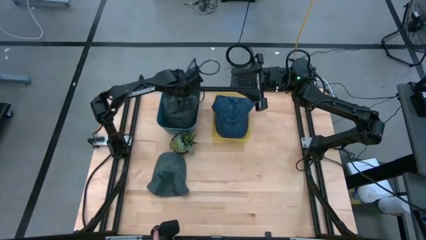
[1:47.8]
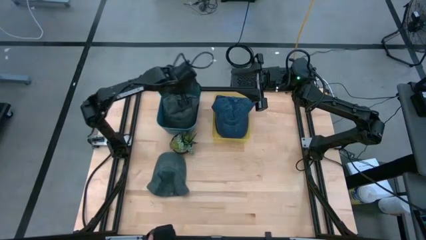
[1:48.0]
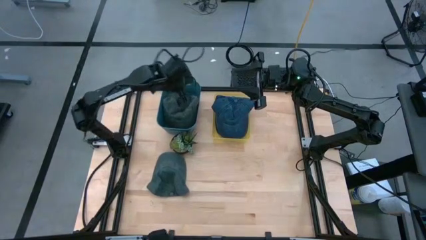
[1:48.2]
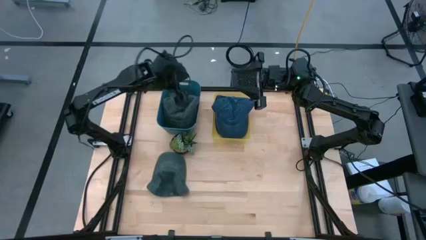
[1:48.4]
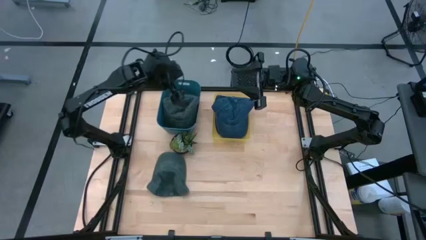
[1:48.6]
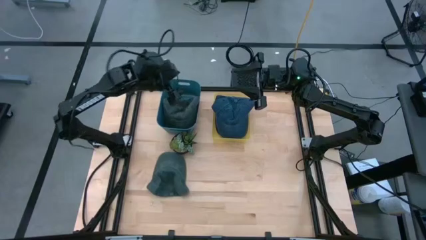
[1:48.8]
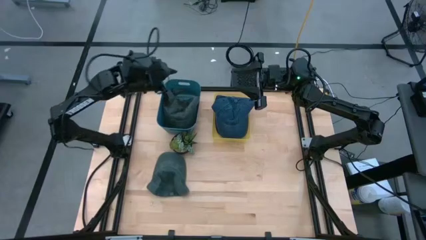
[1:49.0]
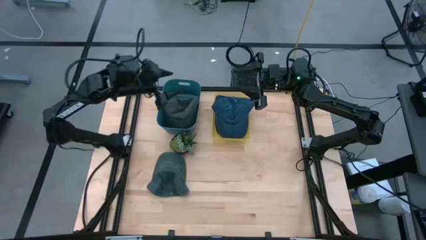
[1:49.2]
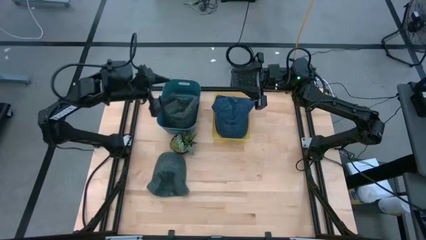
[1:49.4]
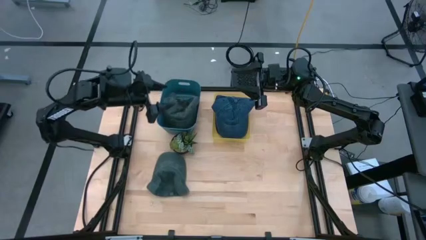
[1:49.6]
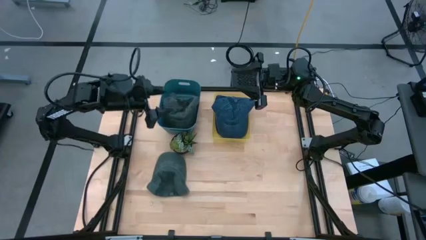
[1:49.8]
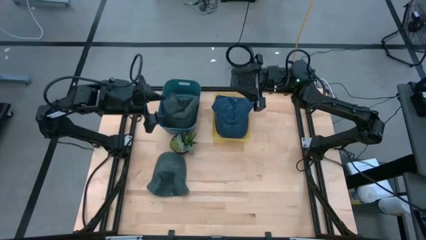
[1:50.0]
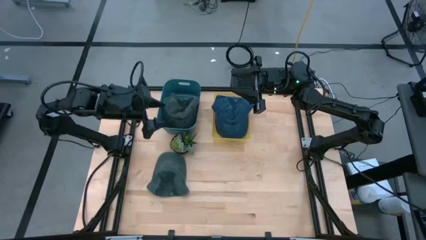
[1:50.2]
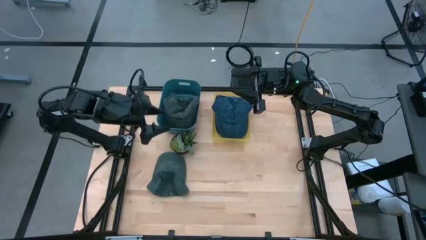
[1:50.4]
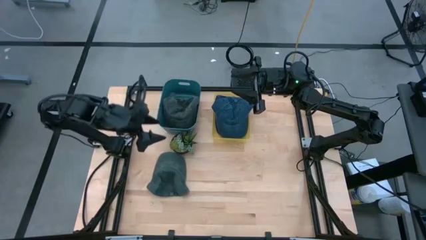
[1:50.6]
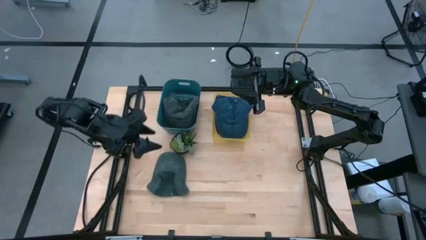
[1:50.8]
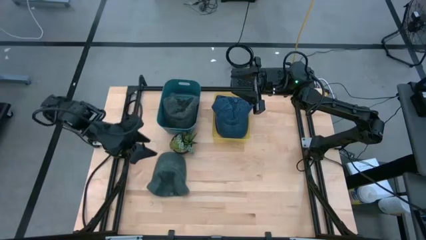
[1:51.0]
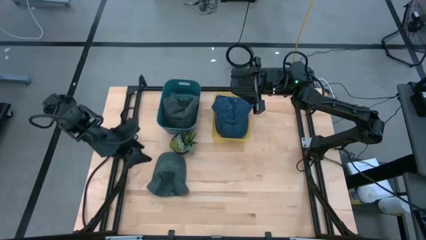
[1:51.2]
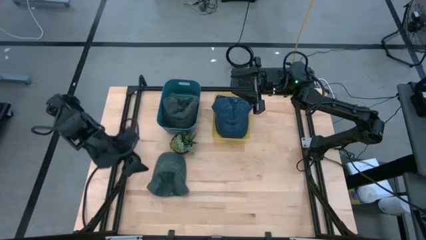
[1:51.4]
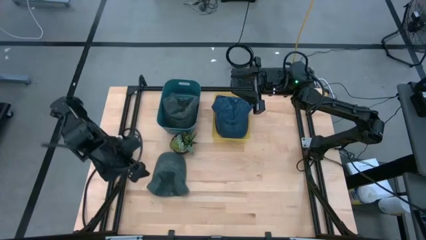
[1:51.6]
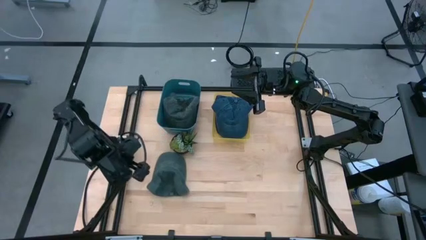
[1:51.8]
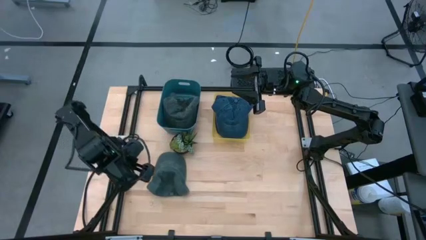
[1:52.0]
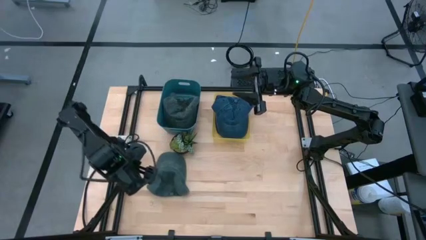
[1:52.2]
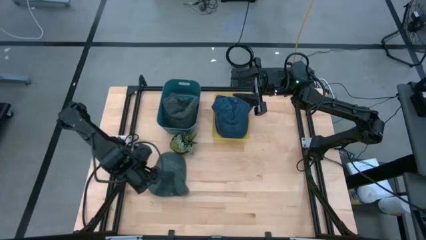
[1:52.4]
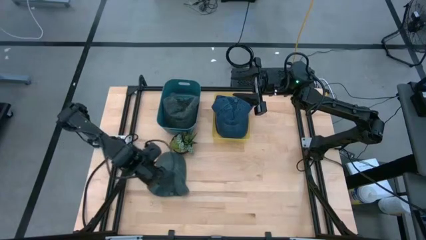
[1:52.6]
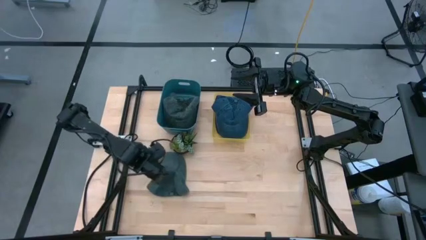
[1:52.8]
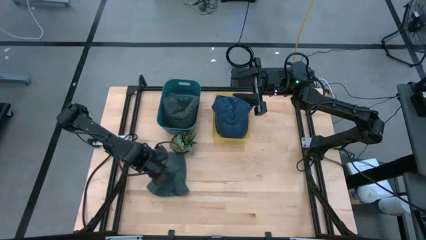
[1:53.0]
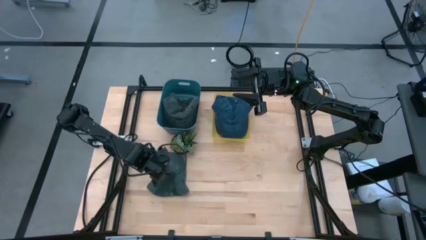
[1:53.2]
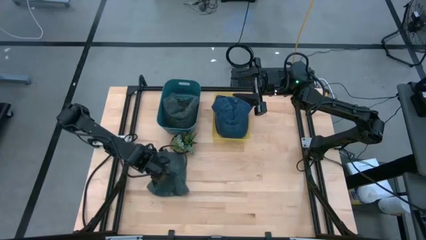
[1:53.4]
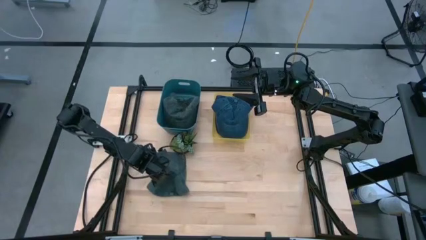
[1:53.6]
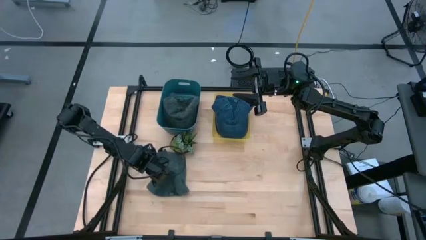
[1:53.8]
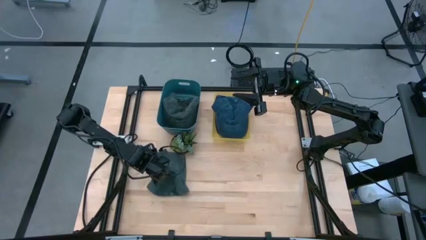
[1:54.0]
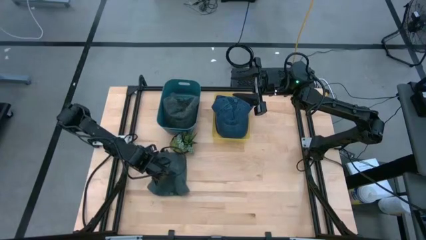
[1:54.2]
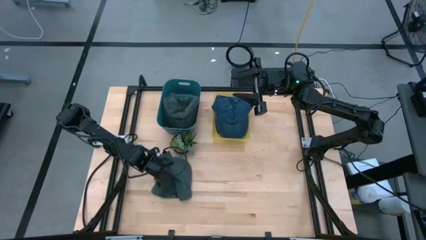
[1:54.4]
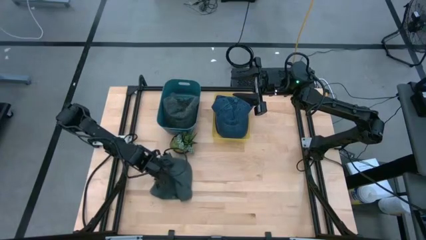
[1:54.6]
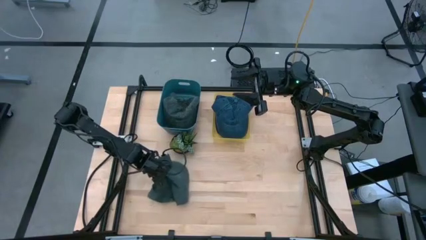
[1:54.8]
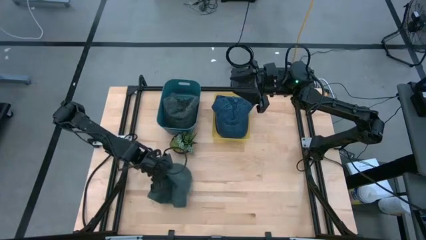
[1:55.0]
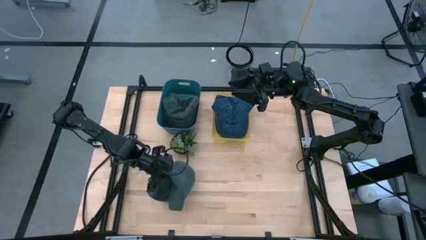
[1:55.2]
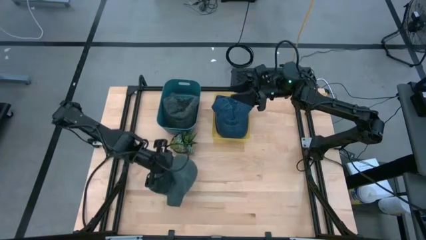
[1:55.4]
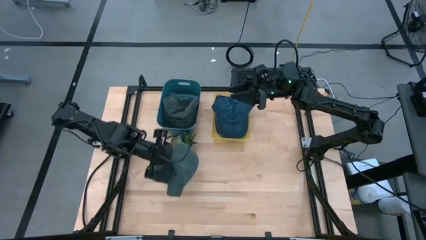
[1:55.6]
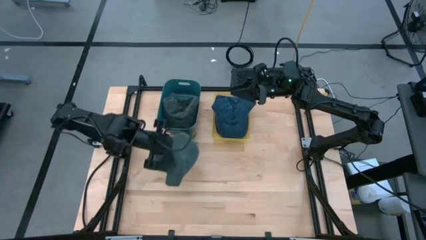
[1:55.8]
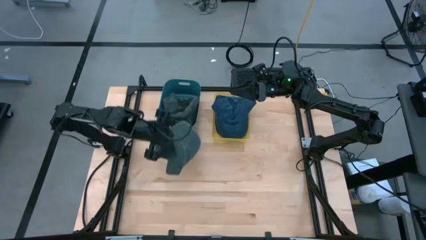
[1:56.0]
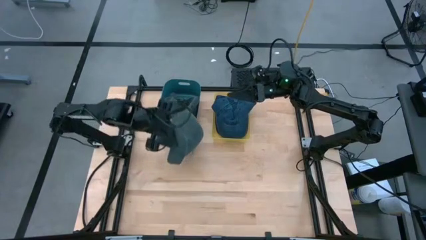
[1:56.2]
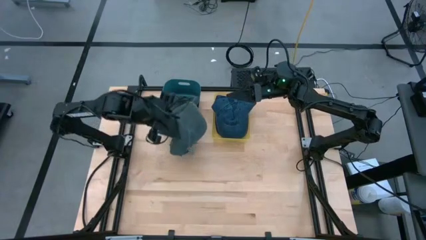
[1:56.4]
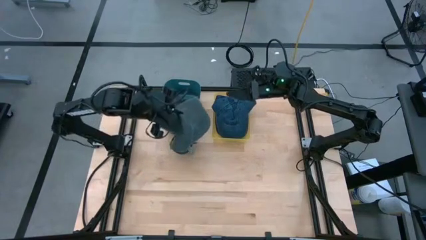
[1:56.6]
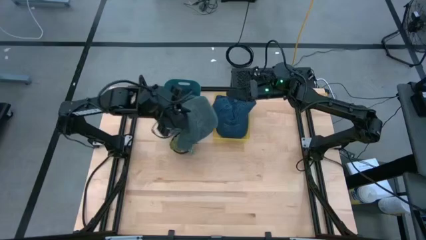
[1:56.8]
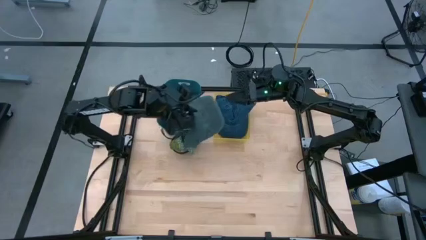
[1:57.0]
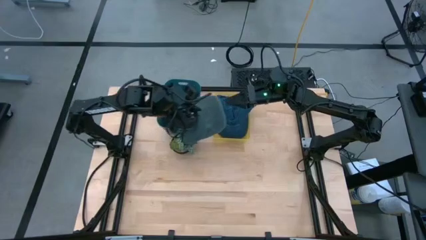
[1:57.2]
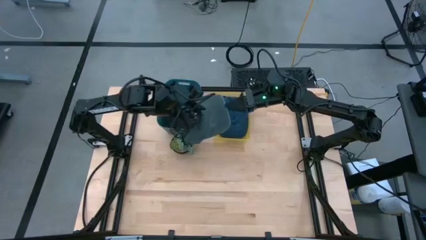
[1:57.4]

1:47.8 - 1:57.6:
Task: Pick & Place hat
Put the black cap into the blue bin

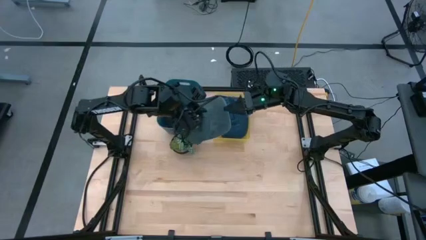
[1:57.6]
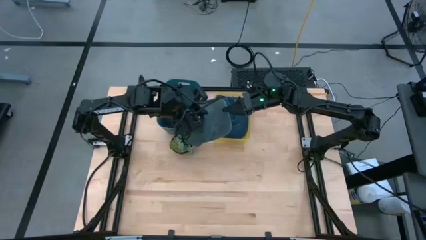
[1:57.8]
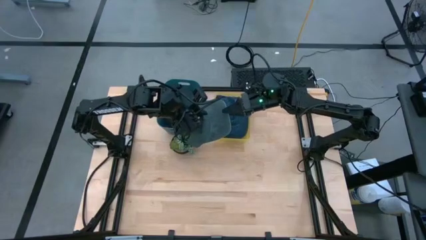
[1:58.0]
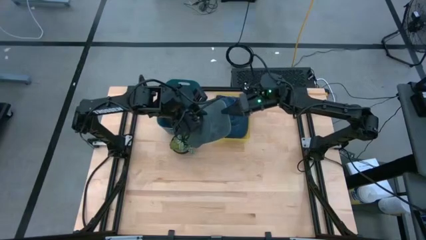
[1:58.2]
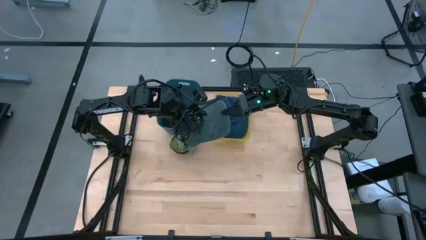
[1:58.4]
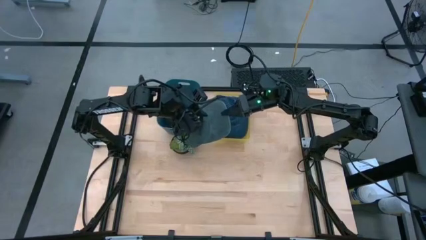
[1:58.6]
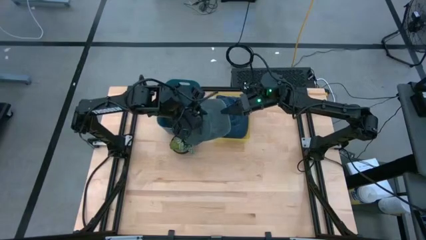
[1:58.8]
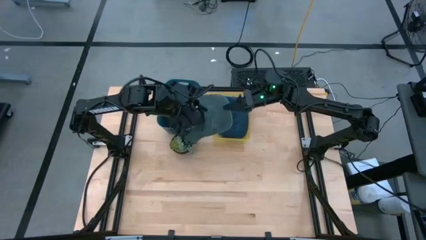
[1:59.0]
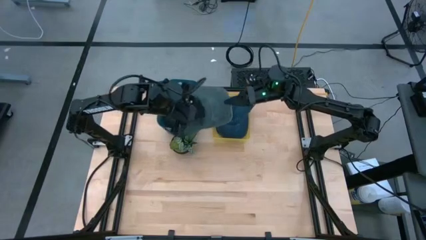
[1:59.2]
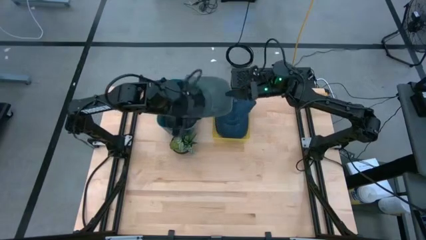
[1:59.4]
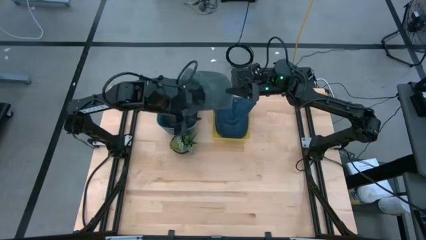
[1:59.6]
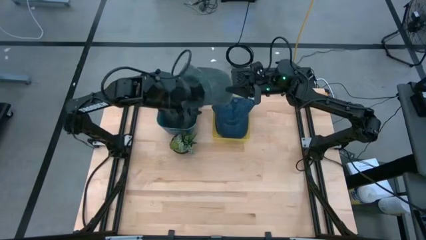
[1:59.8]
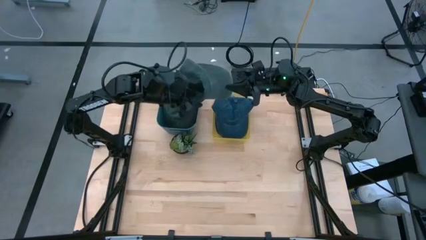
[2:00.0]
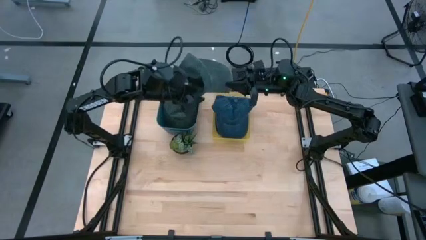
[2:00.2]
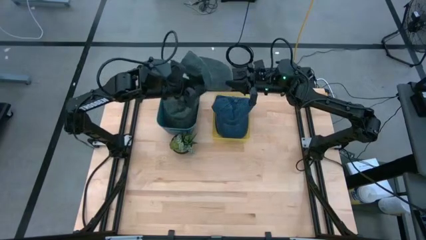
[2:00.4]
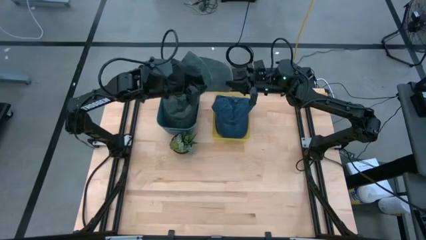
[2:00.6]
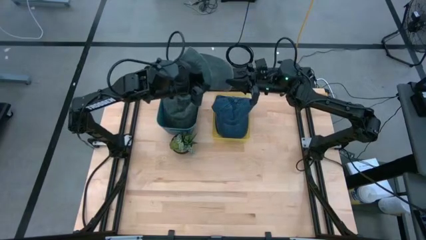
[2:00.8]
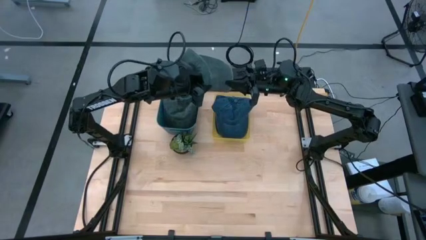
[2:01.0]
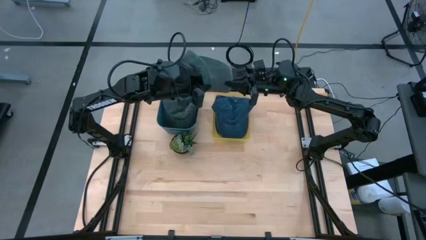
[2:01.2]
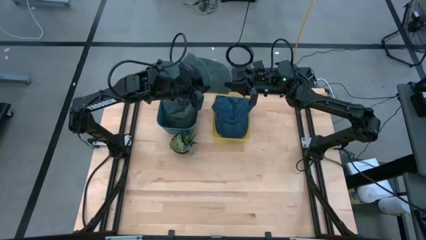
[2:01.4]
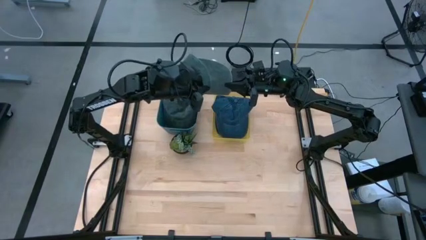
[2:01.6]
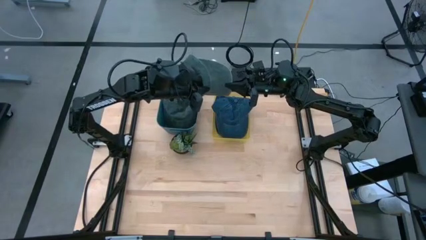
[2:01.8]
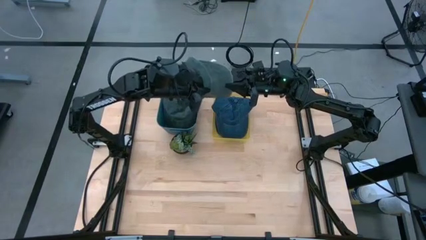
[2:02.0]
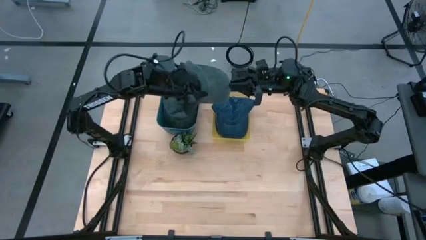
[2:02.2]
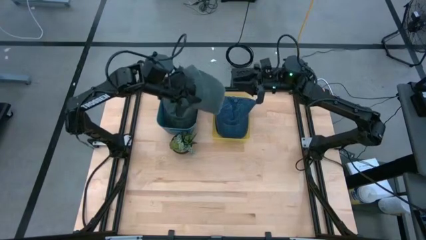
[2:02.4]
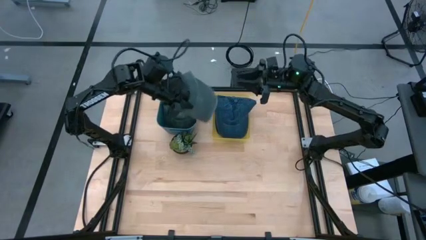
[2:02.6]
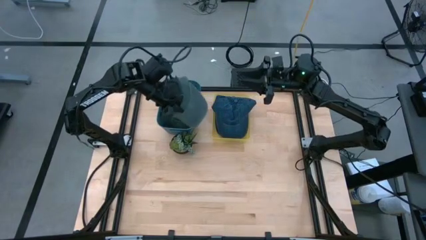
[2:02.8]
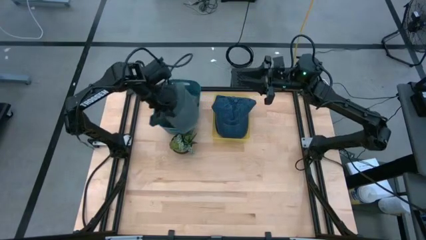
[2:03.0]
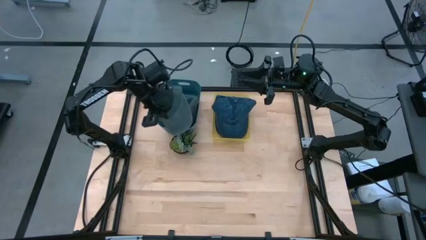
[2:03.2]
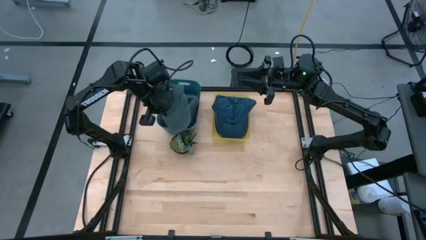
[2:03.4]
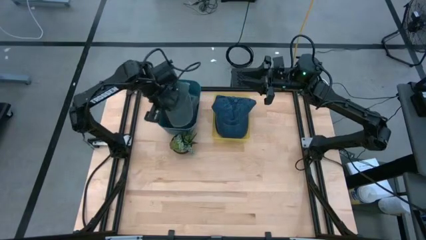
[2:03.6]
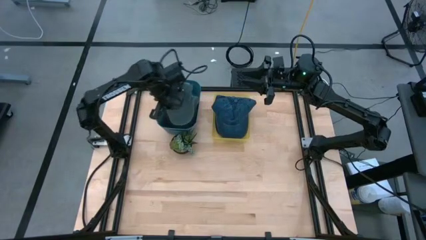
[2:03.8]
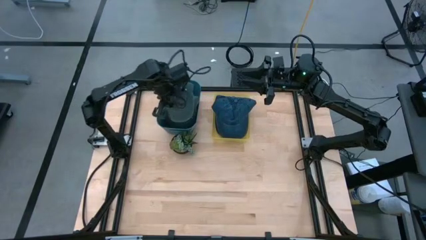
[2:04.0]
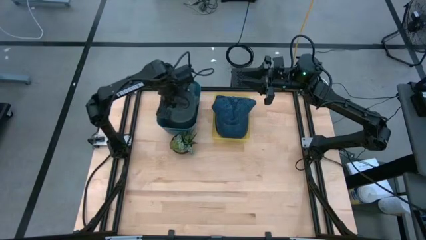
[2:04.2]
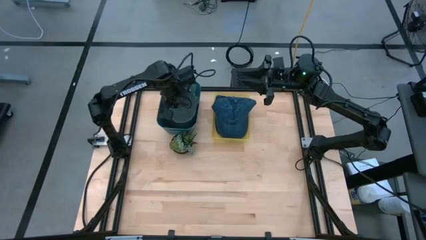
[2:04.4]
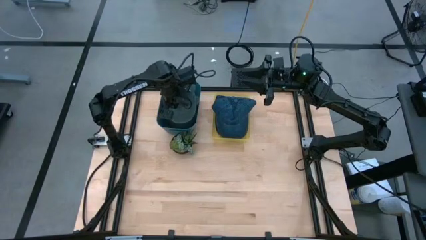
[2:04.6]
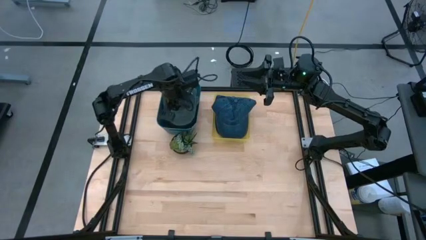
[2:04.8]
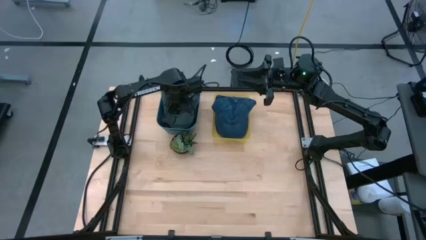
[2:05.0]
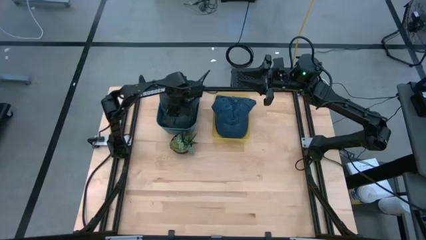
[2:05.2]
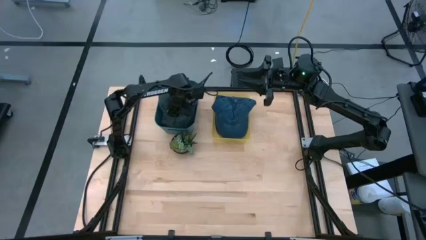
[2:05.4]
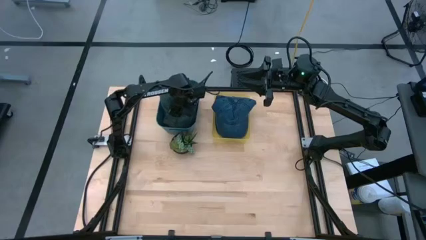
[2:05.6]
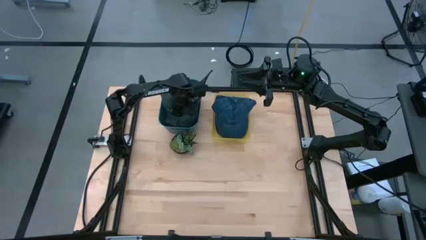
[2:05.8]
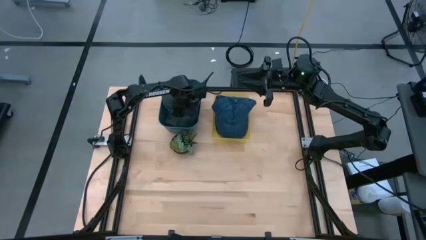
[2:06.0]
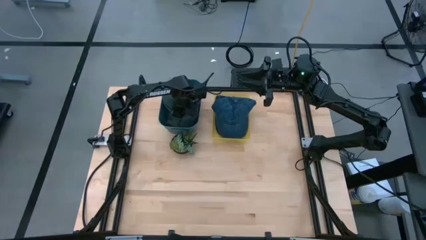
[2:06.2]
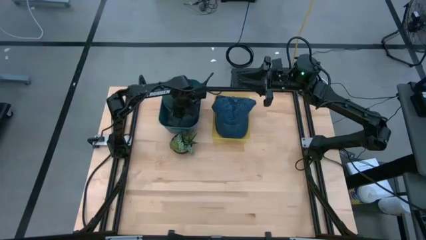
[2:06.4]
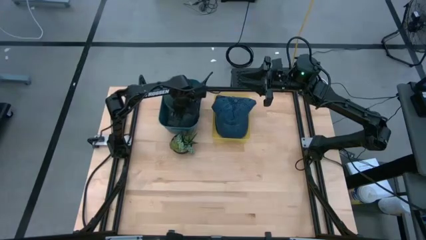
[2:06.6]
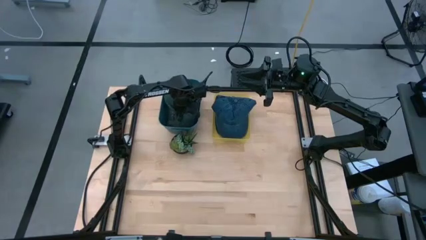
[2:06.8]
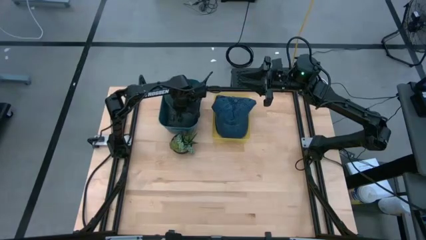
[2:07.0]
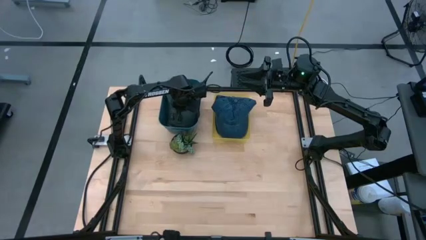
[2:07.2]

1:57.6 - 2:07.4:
Put the black cap into the blue bin
